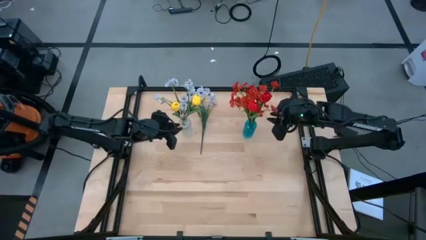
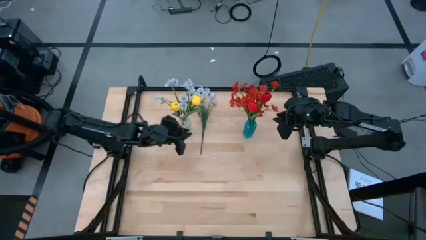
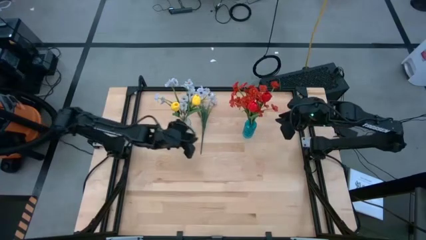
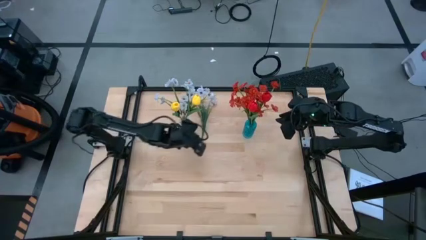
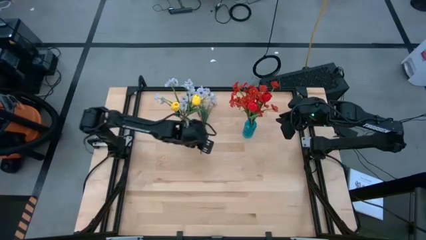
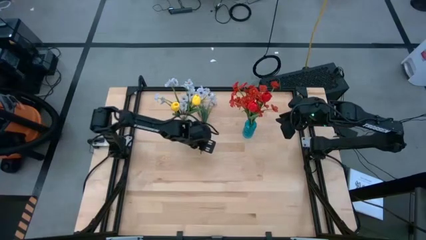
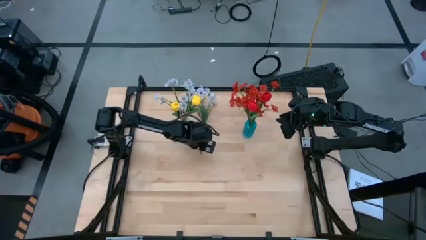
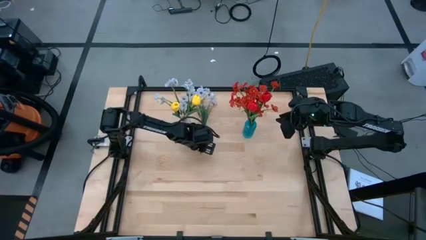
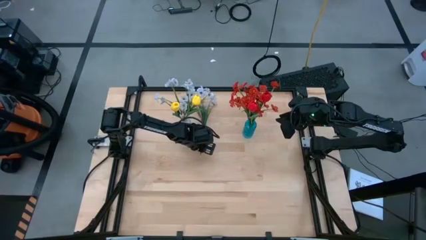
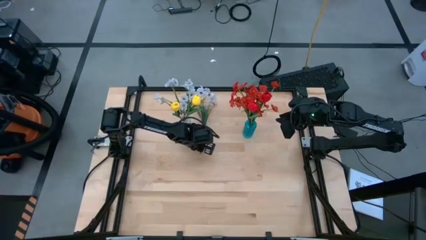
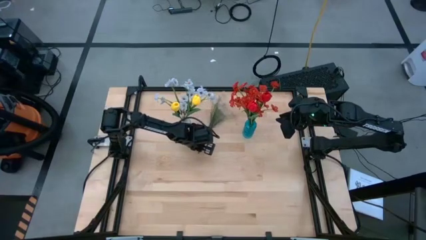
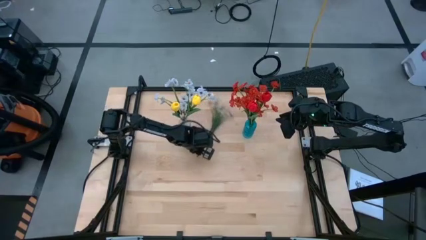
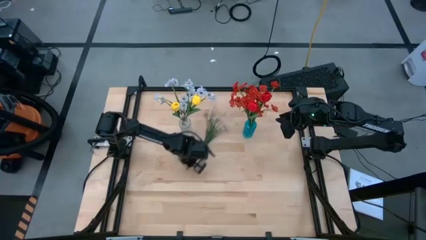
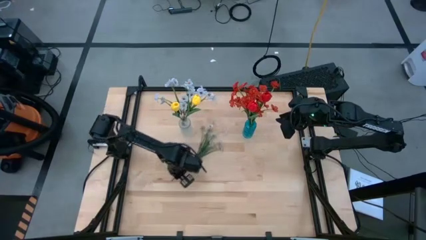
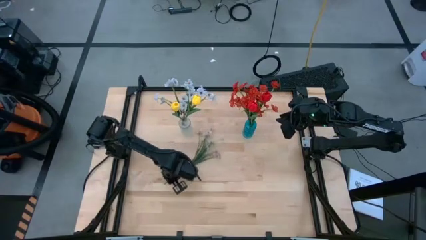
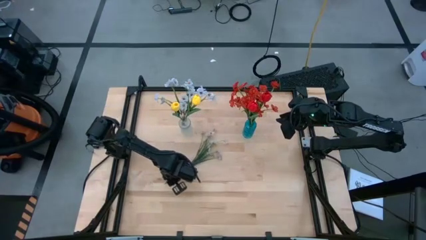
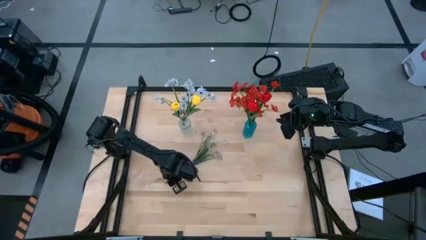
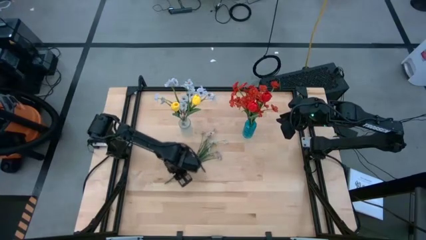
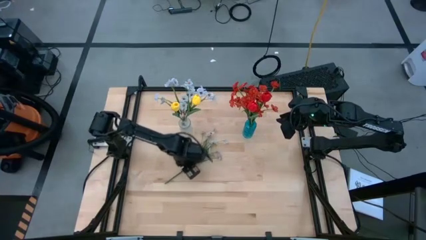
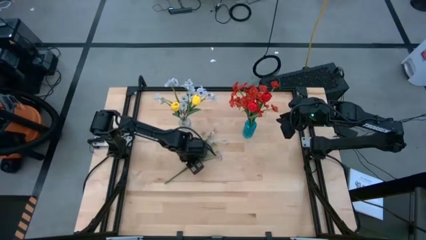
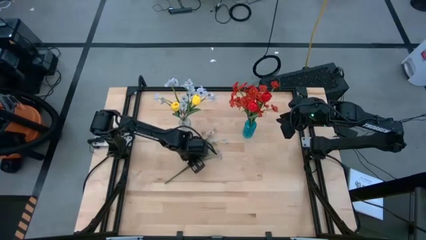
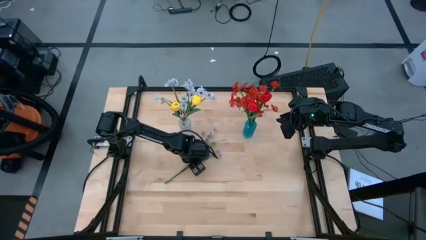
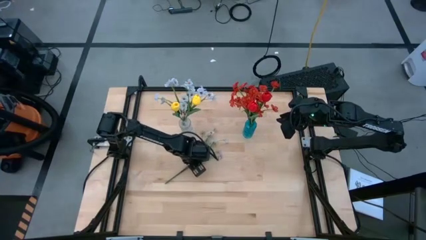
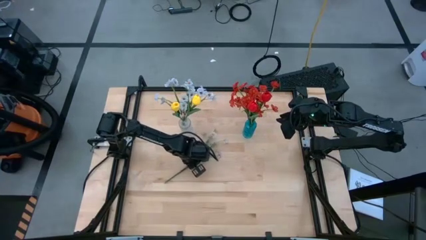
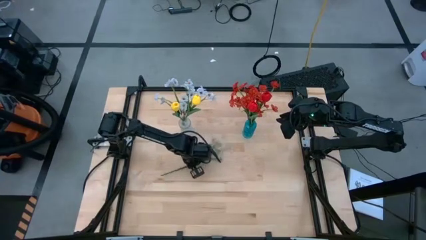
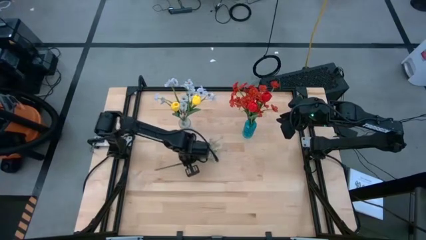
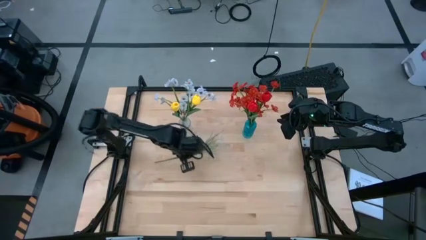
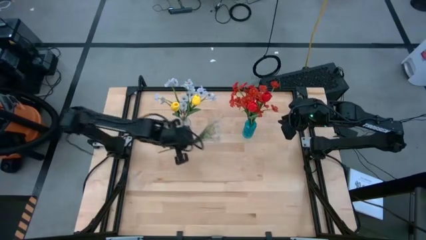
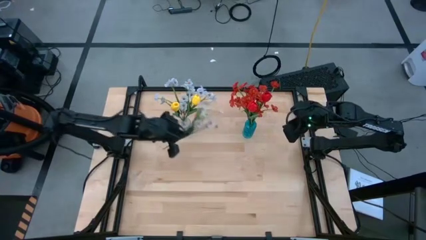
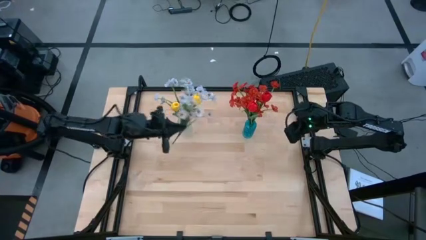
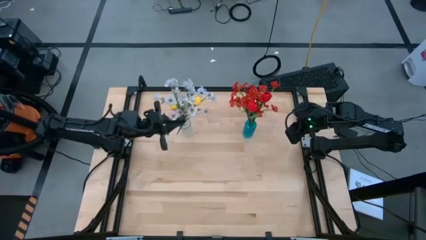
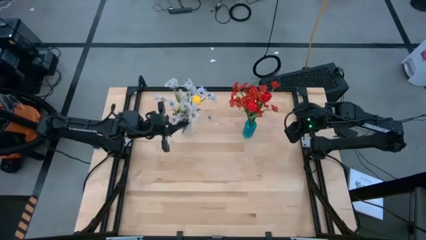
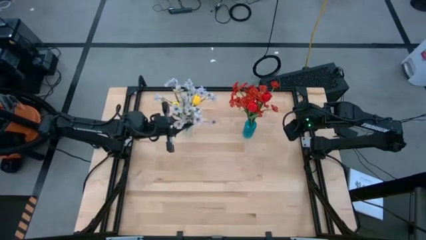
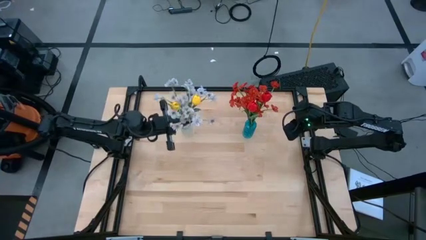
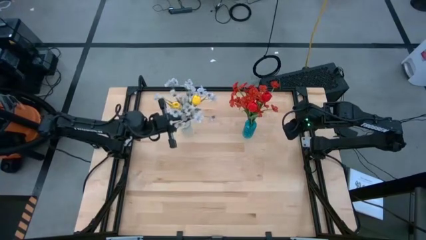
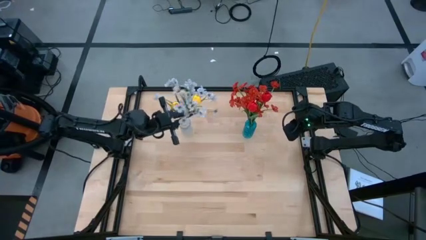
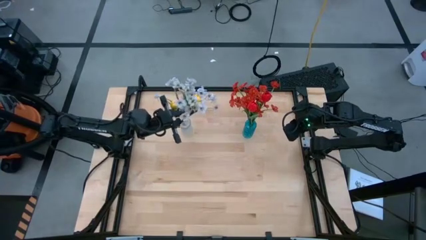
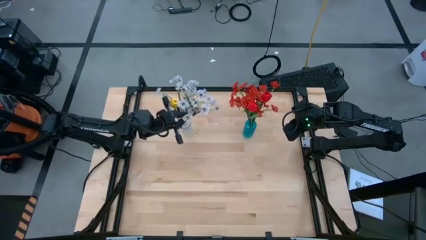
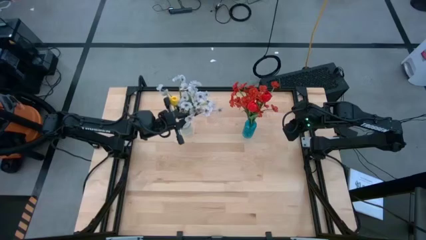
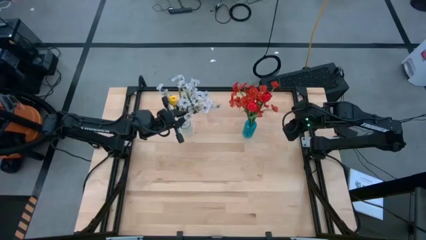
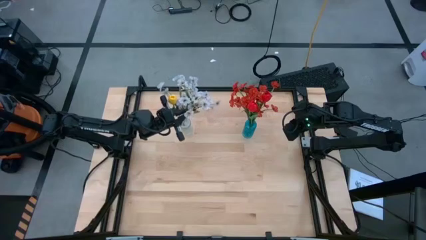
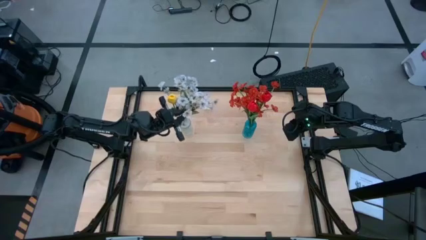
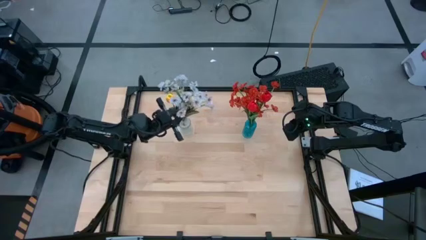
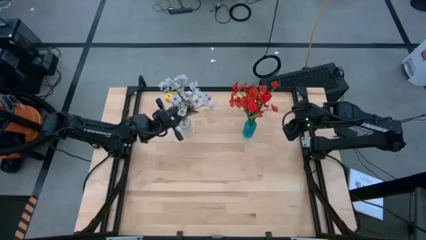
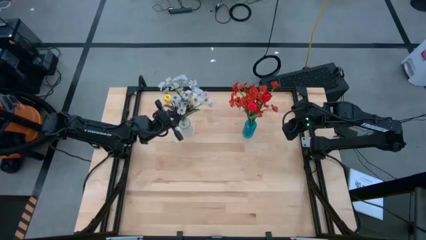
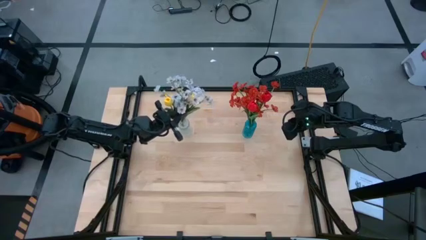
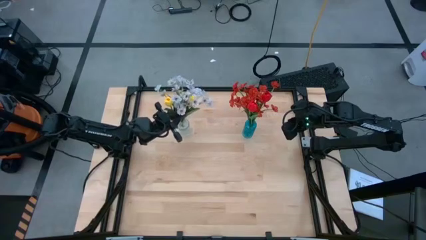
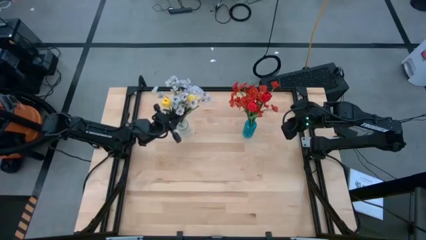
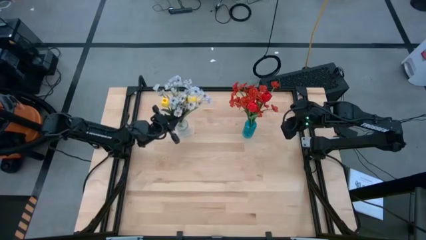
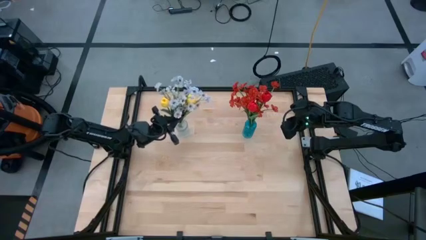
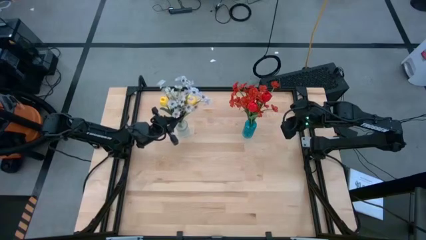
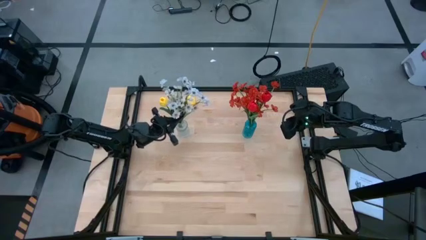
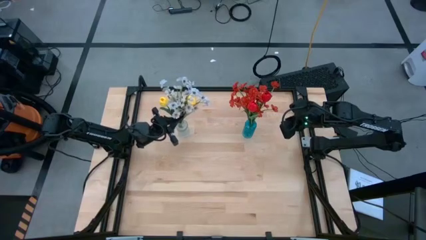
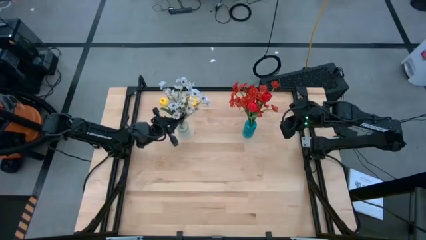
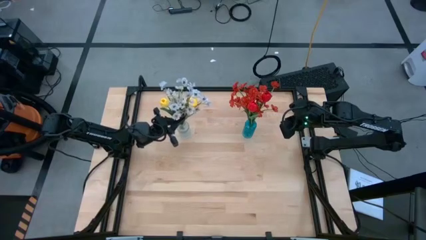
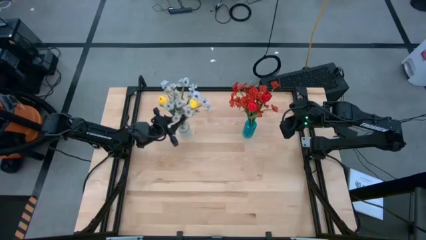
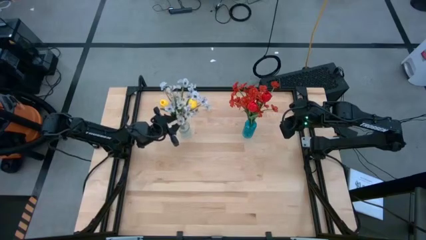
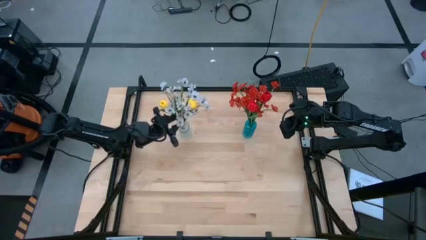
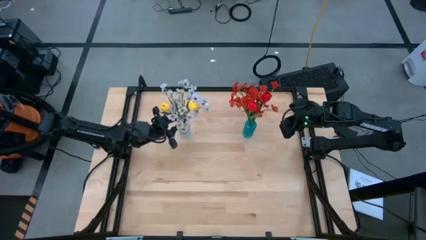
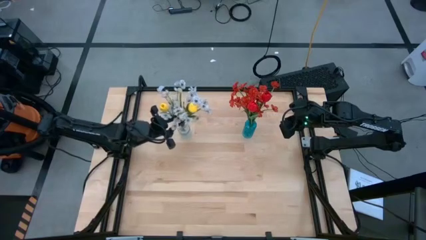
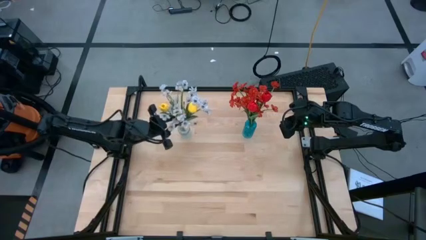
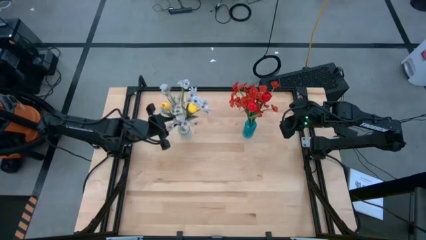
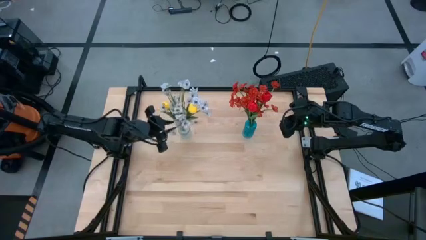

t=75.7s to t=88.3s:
Task: Sort flowers into vase by color
Put the white flowers into the transparent crystal vase

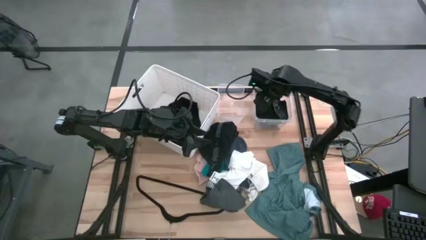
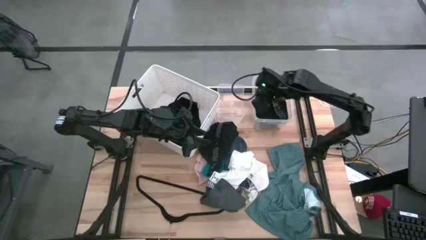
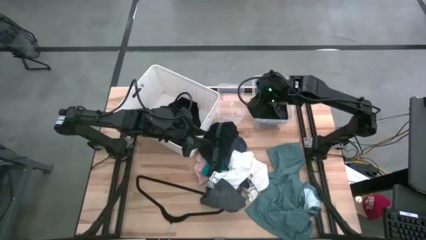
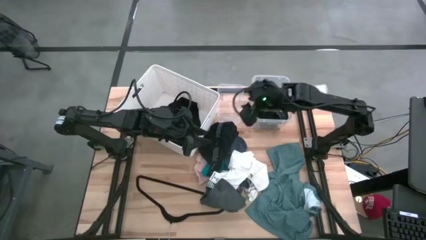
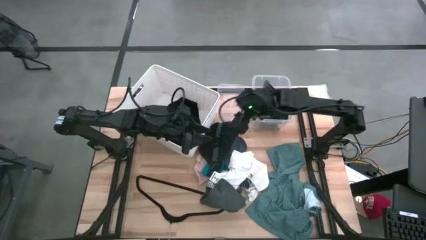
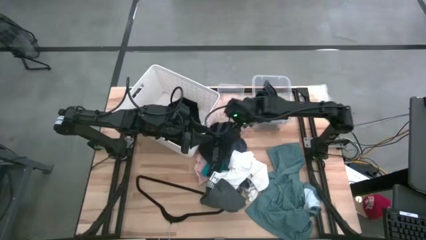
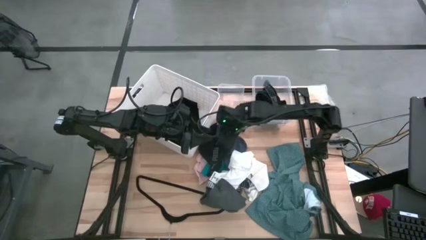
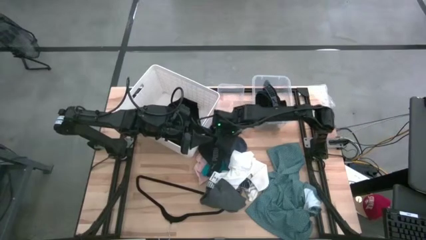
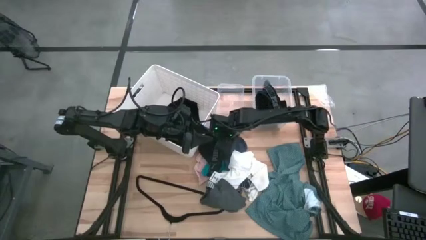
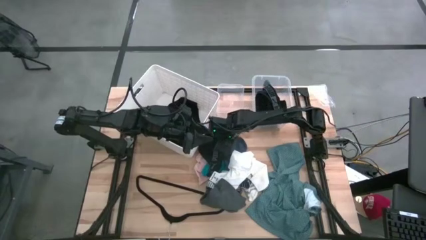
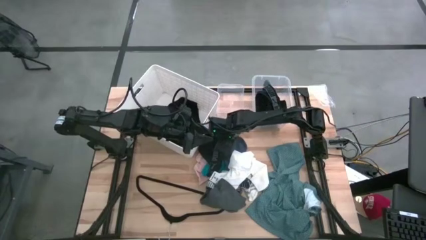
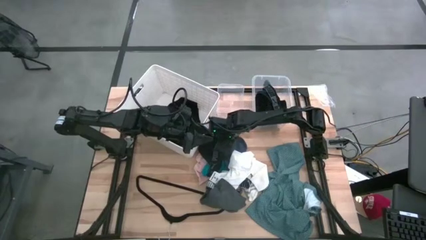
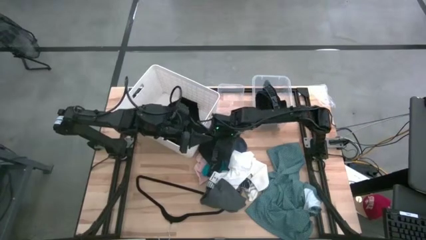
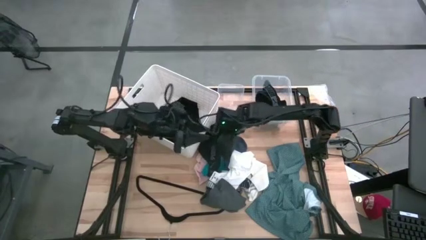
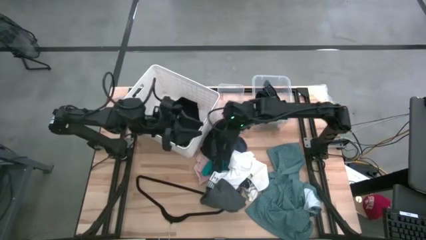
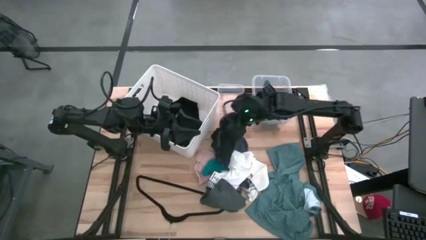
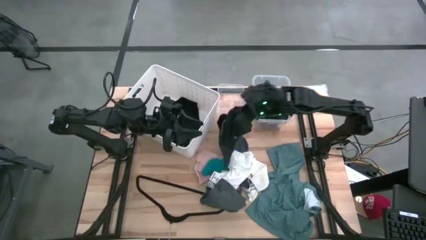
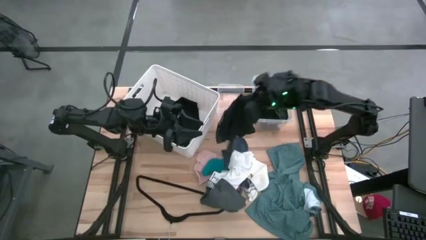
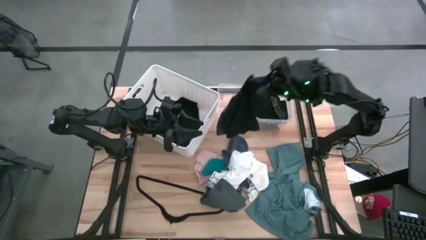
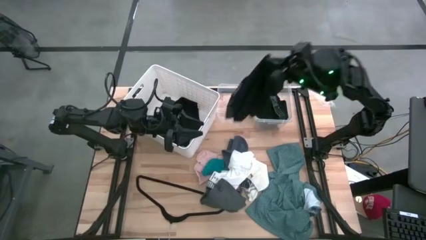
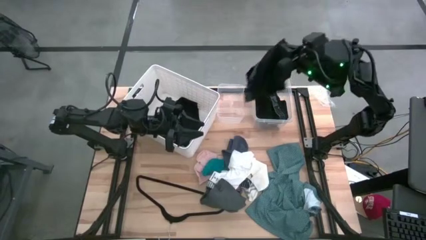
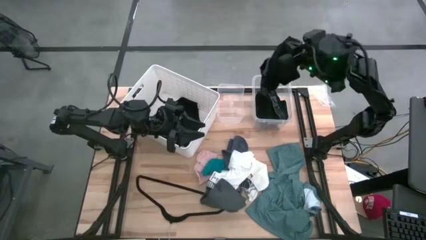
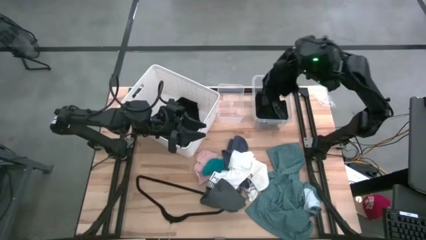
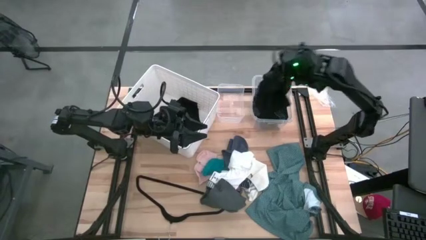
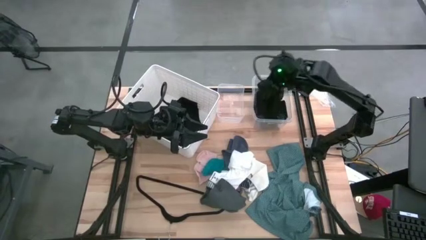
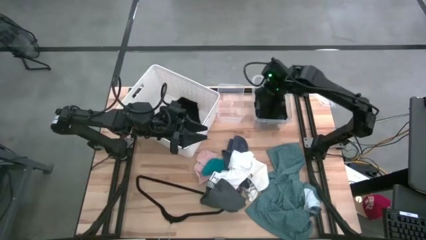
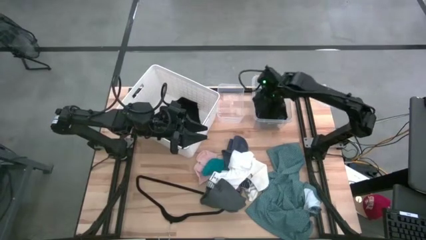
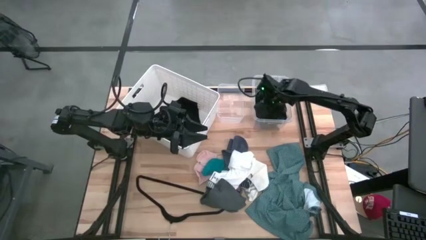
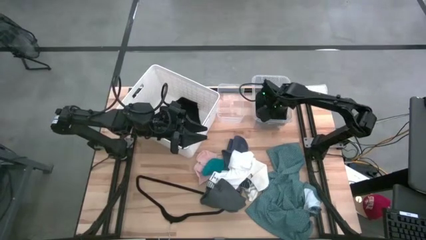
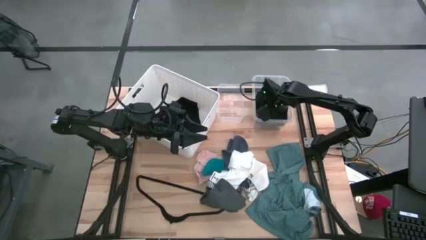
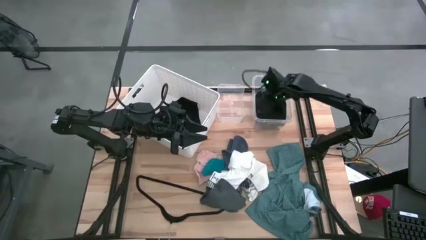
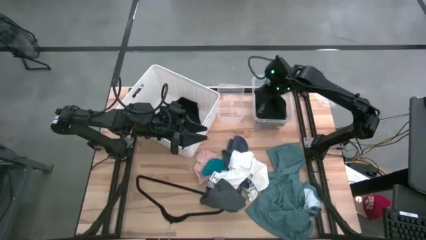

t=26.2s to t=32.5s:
Task: Pick & Place Cloths
Put the black underwear into the right transparent bin
